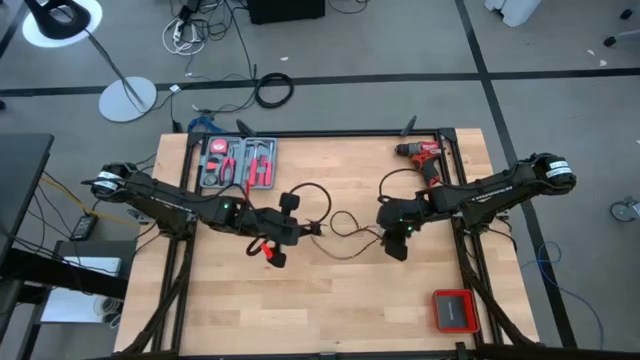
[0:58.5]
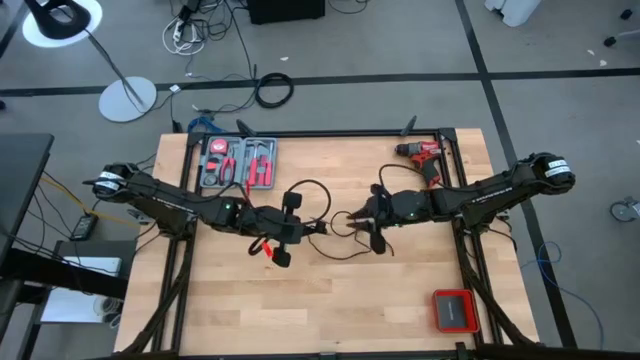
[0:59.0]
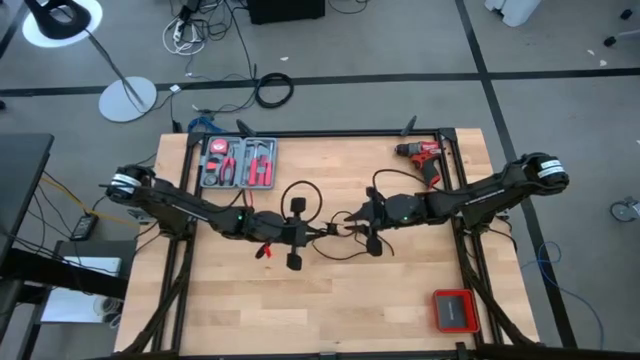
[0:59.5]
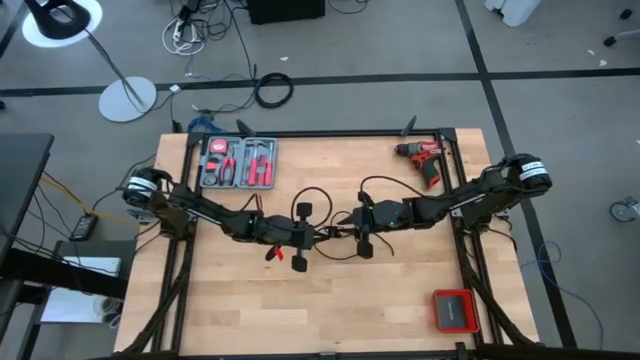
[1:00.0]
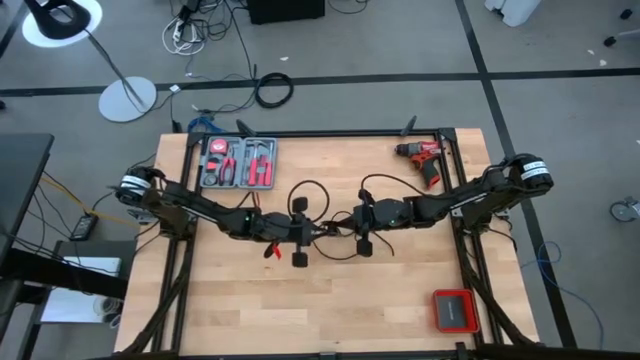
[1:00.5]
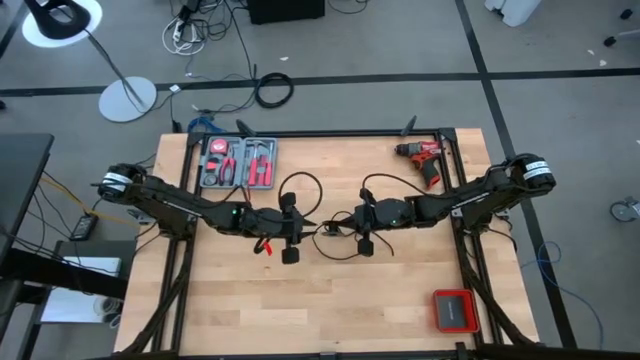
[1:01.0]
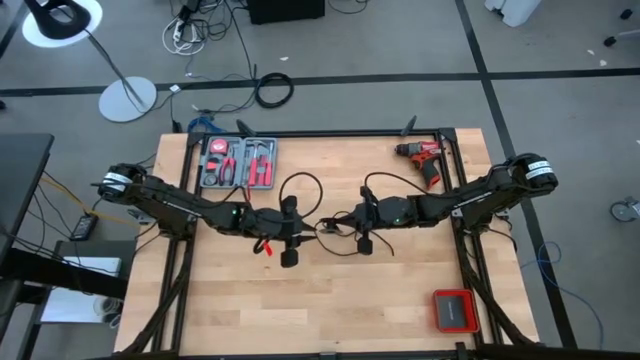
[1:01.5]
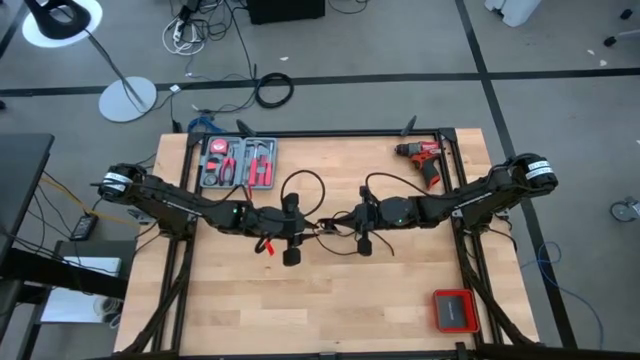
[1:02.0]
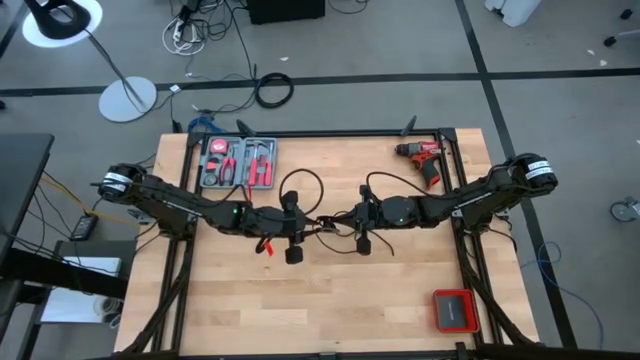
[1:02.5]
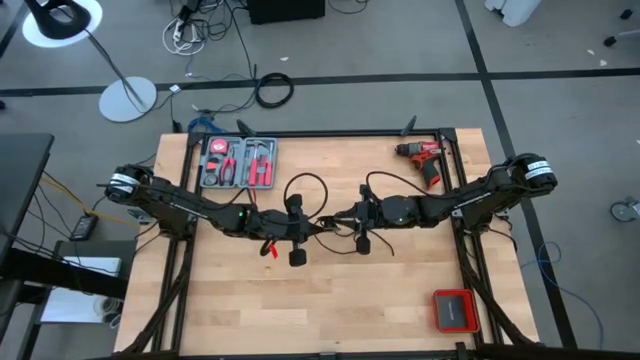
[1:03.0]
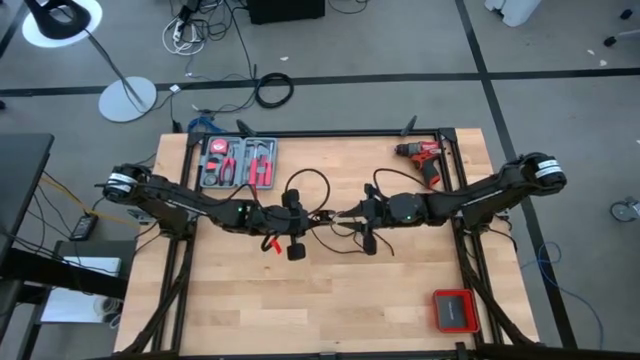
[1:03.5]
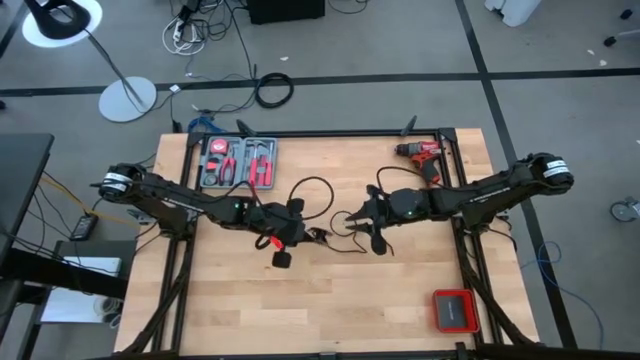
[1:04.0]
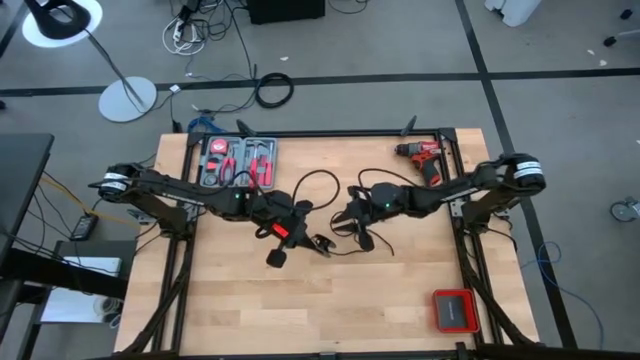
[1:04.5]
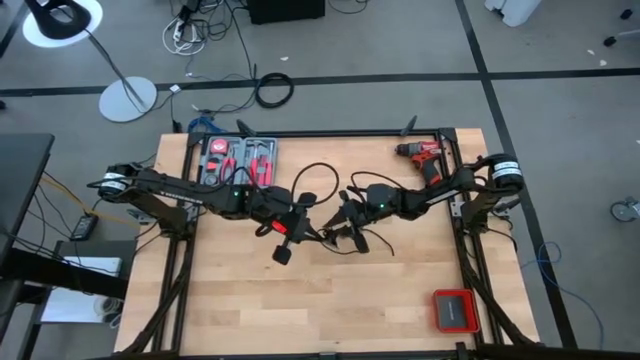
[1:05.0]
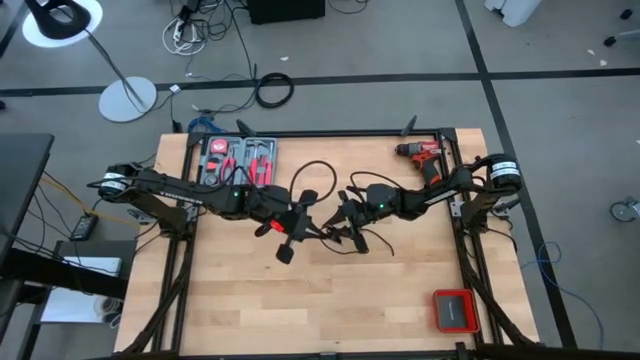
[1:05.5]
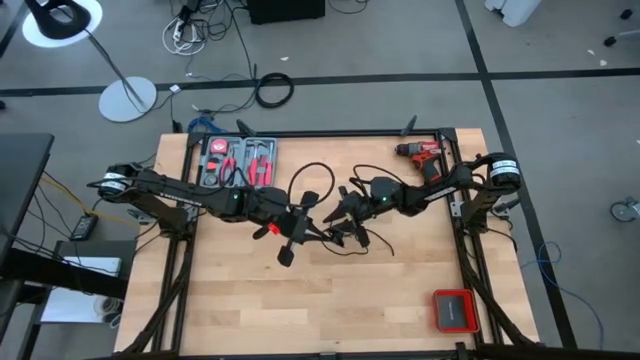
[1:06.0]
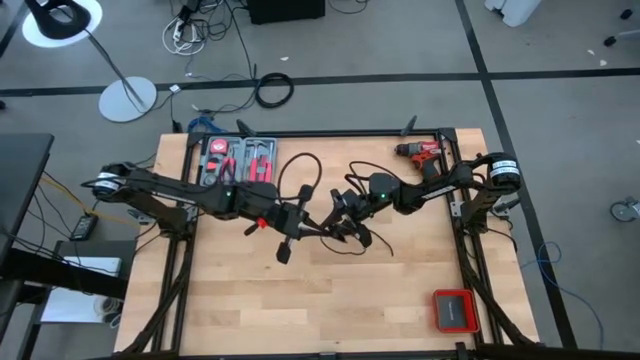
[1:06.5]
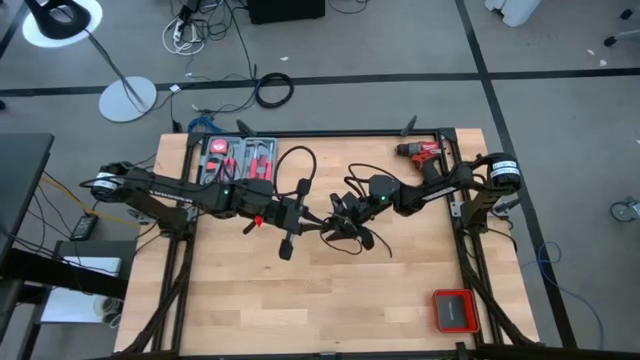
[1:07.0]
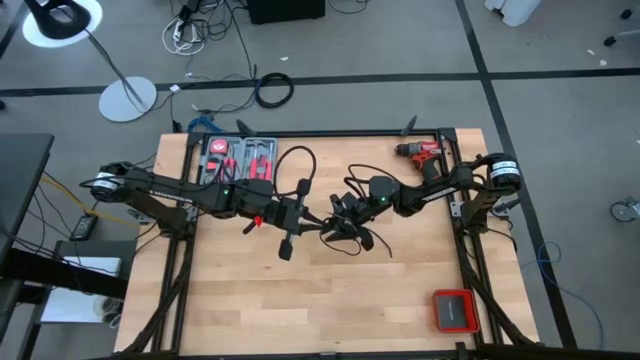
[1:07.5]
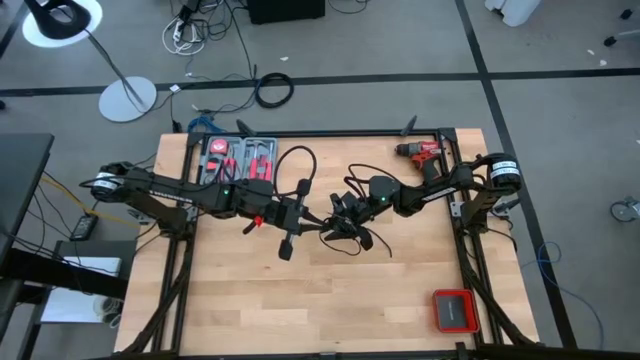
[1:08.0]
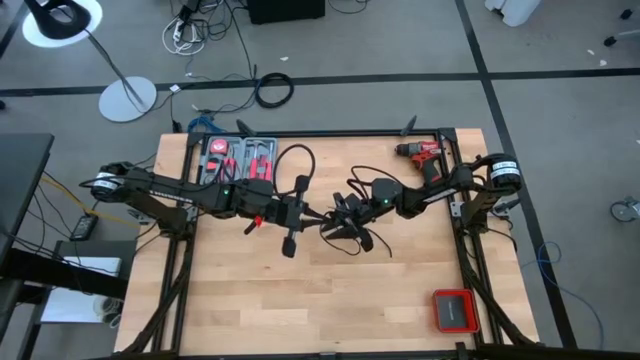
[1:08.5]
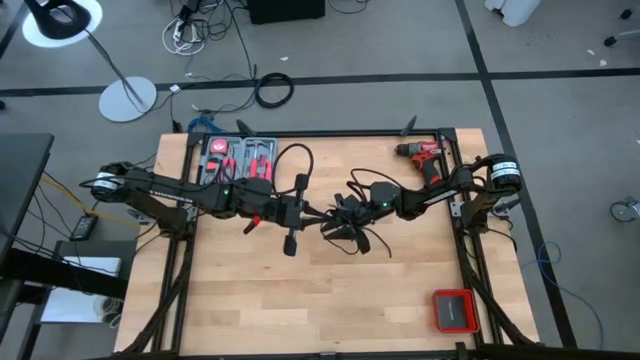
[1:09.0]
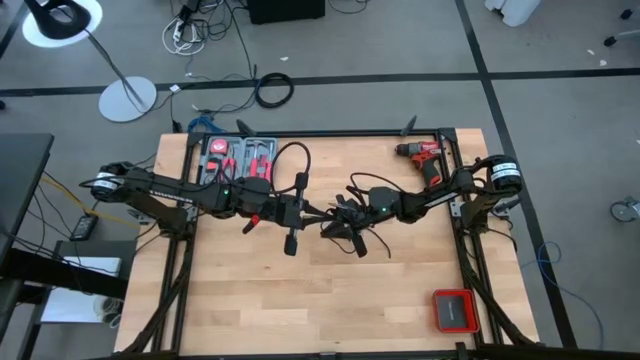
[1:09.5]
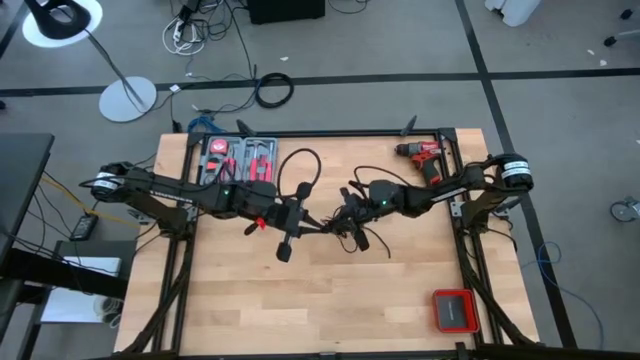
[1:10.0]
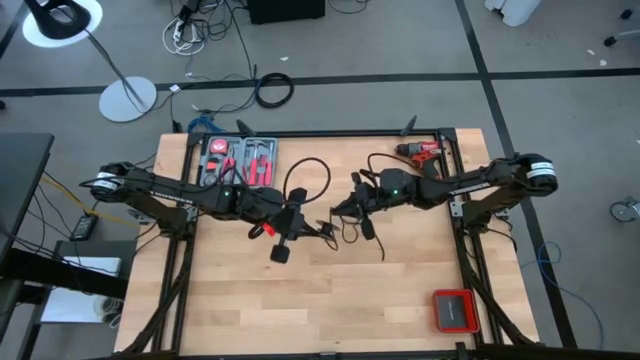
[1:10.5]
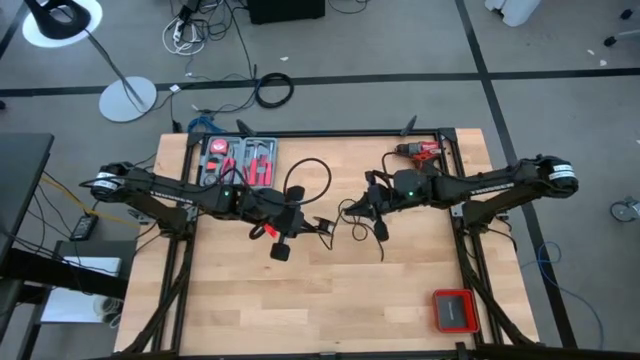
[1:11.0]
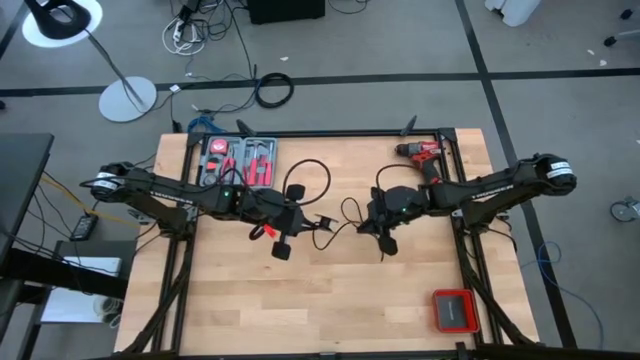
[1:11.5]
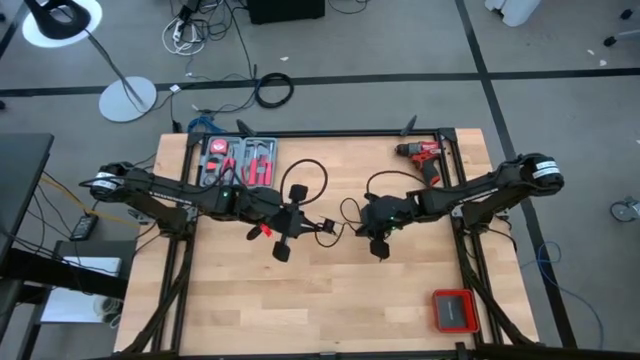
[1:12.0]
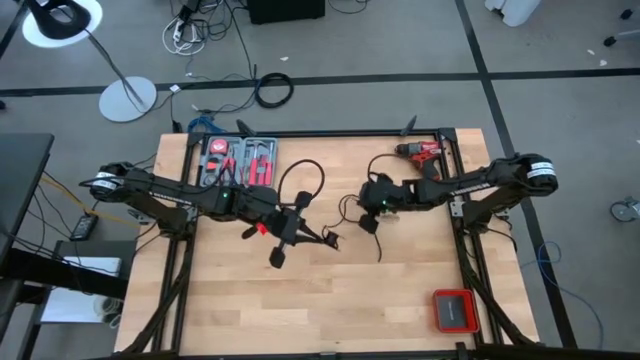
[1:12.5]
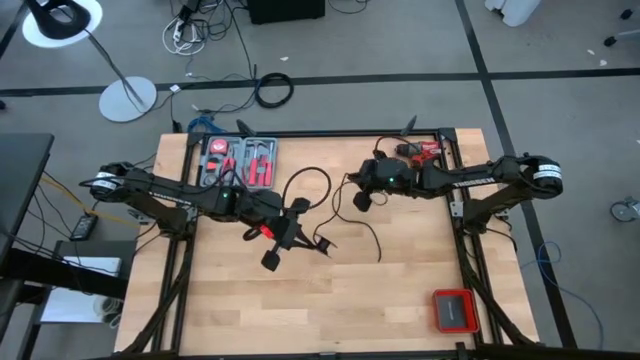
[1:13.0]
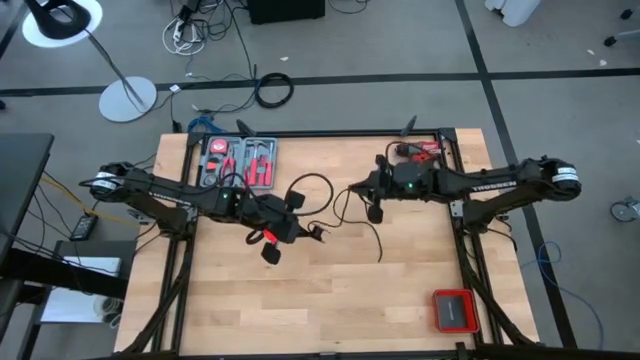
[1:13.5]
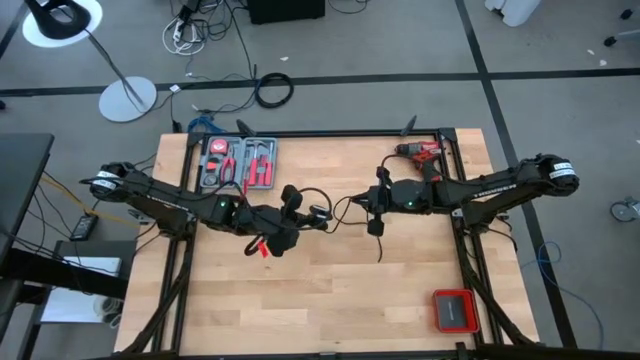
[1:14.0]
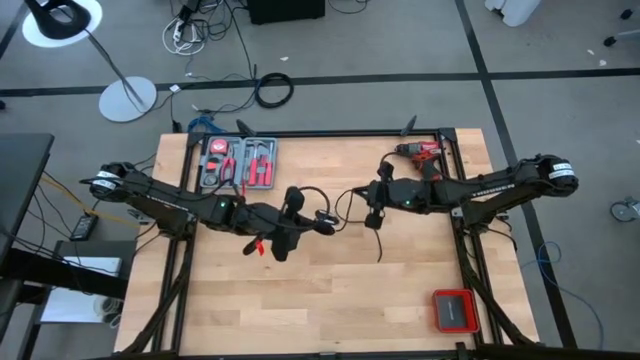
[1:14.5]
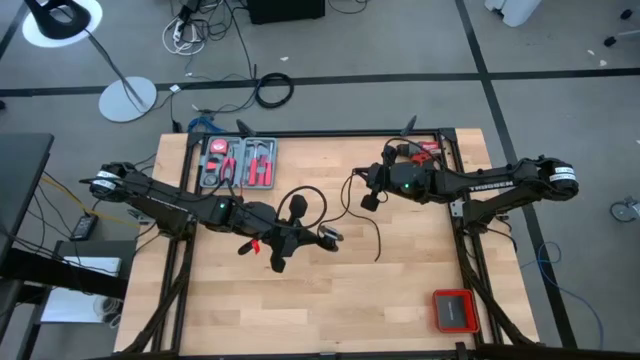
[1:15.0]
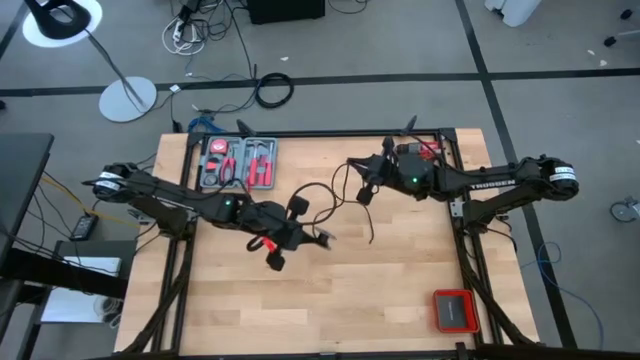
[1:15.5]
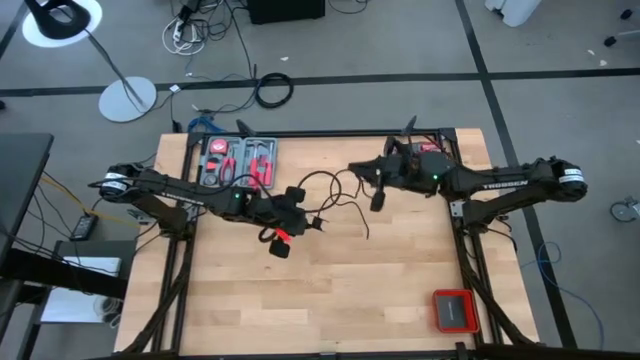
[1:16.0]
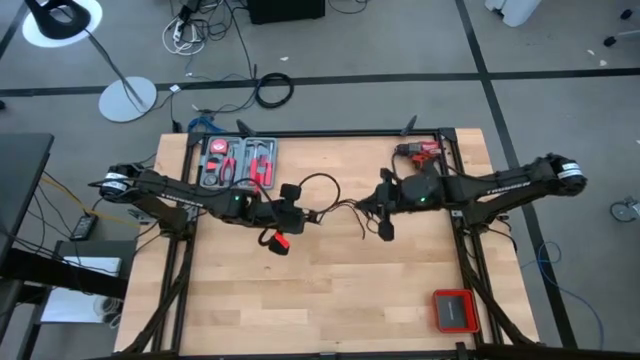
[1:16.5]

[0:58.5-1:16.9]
Task: Coil cords
Uncoil the black wire from the black spool

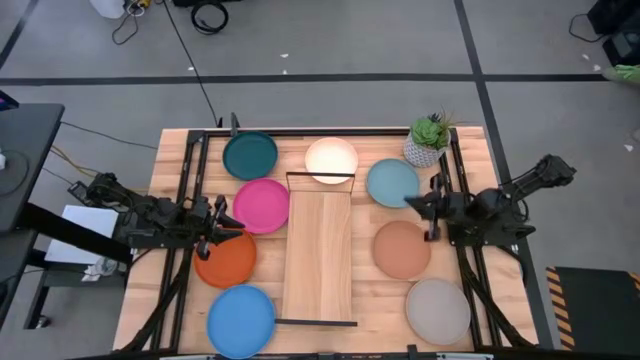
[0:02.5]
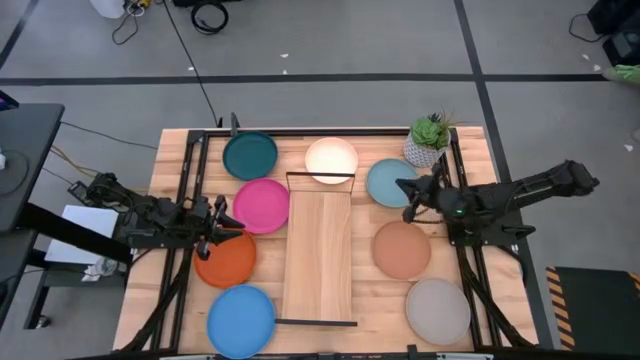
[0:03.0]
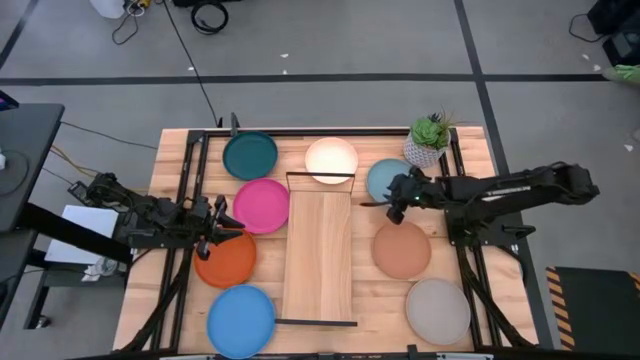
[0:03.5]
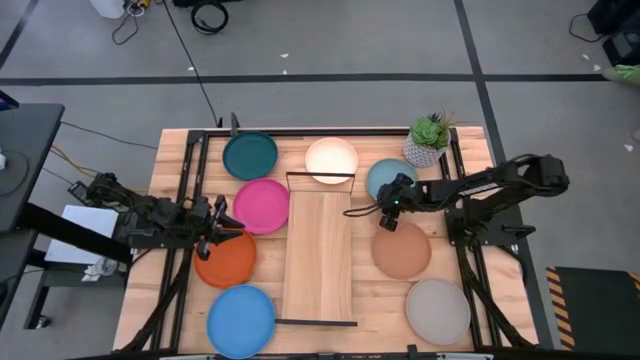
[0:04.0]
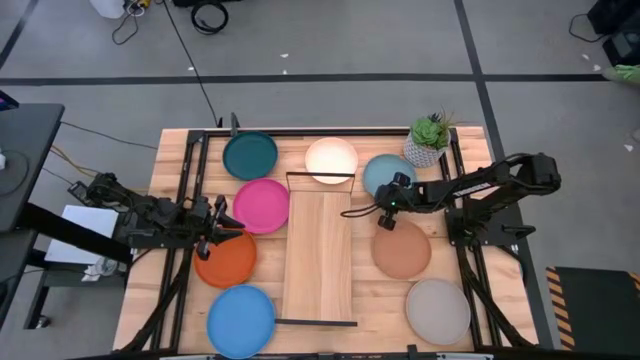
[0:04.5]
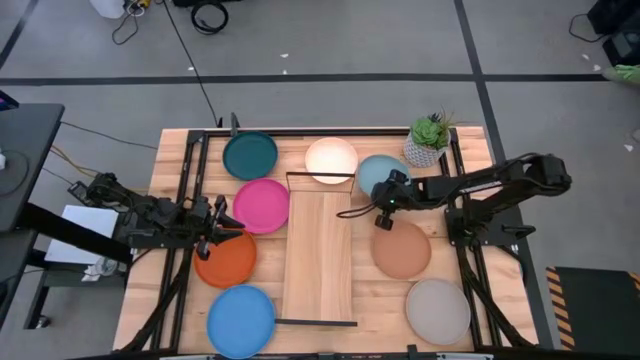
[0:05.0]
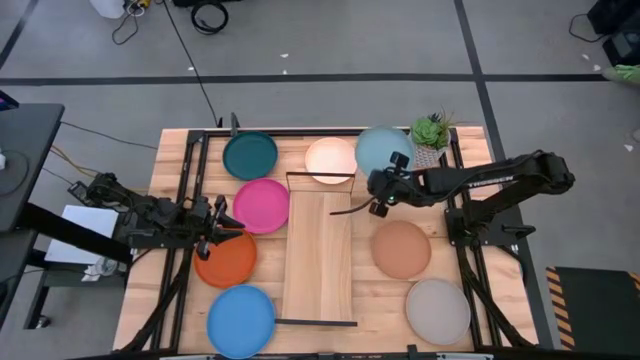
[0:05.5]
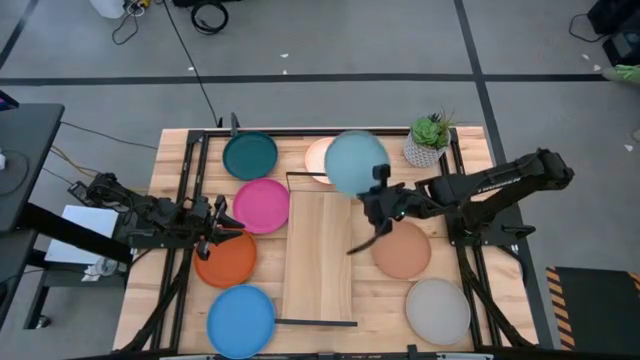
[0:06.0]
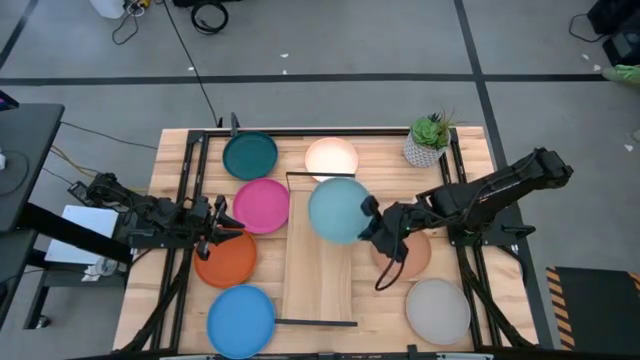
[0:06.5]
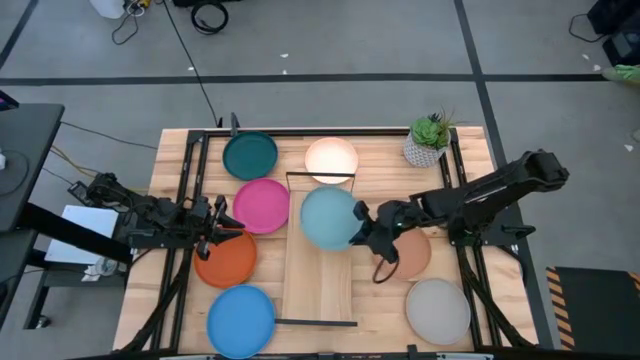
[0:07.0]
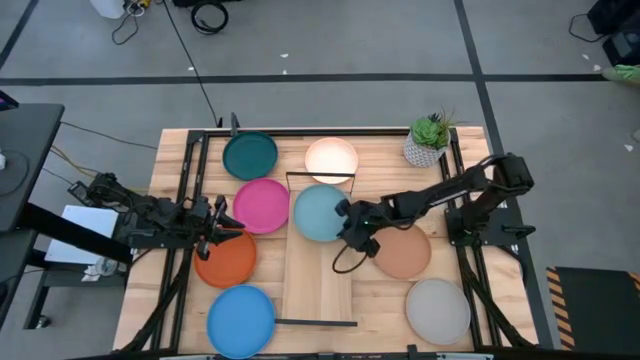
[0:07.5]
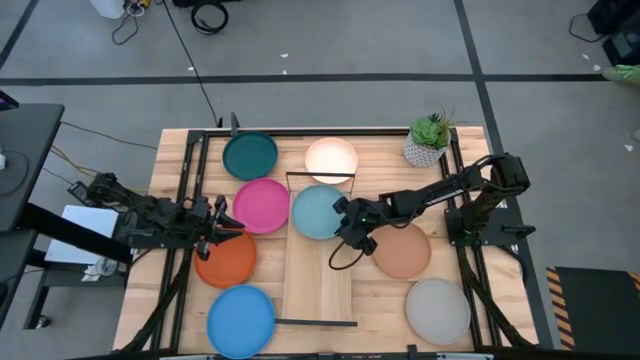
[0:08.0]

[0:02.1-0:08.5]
Task: Place and stack plates onto a shelf
Put the light blue plate on the shelf
